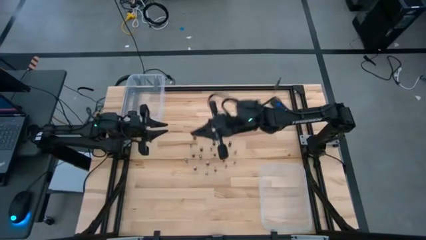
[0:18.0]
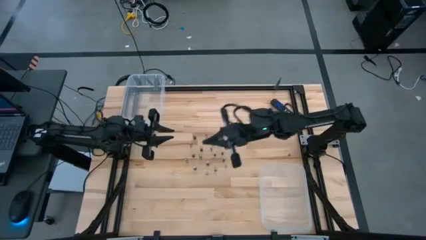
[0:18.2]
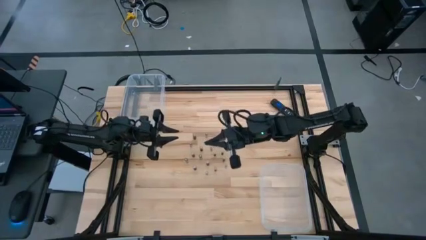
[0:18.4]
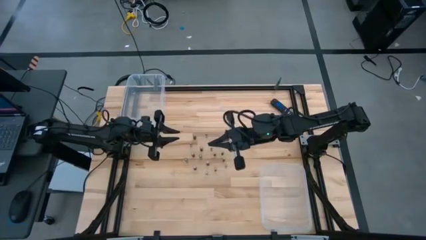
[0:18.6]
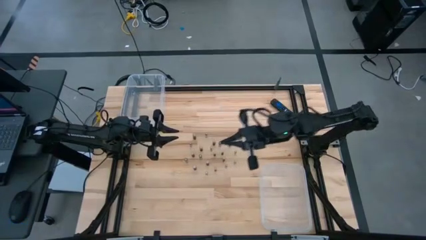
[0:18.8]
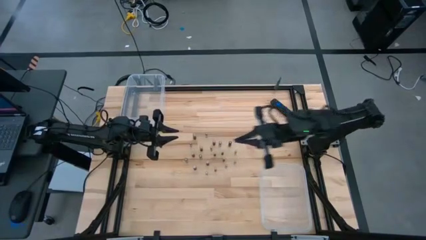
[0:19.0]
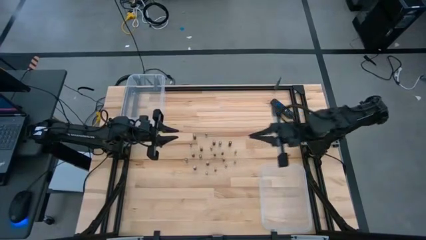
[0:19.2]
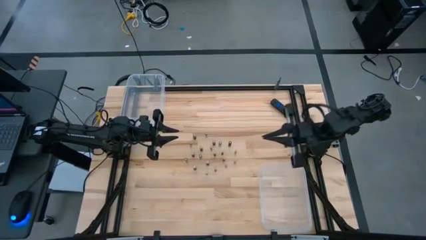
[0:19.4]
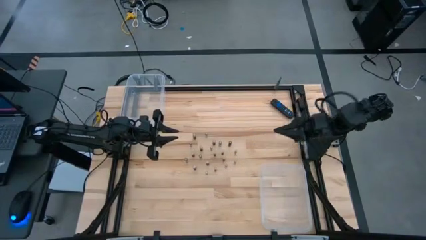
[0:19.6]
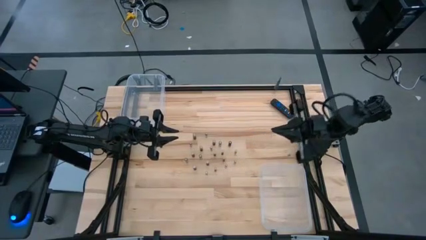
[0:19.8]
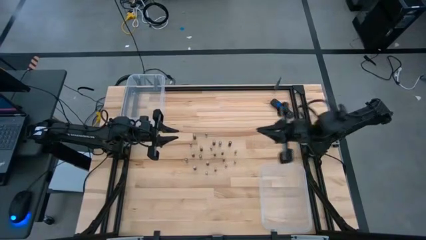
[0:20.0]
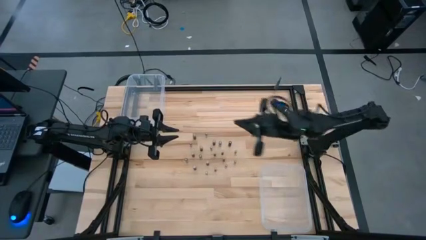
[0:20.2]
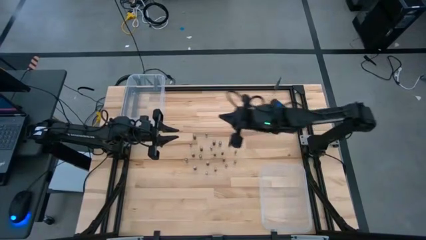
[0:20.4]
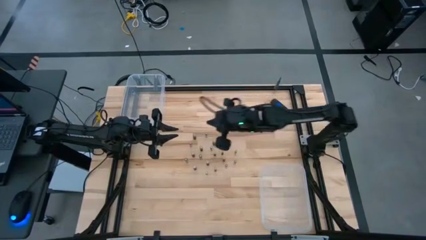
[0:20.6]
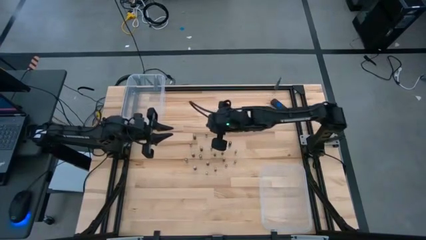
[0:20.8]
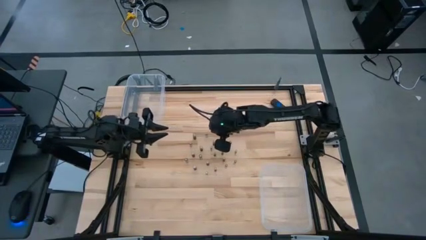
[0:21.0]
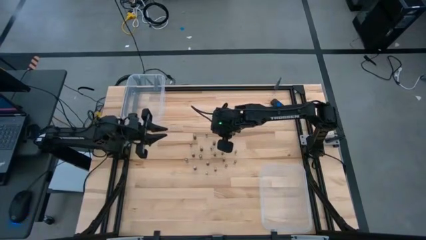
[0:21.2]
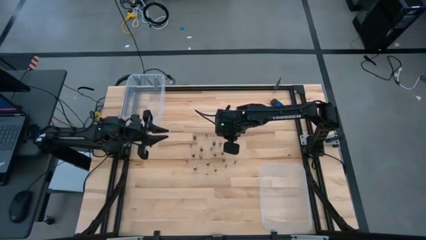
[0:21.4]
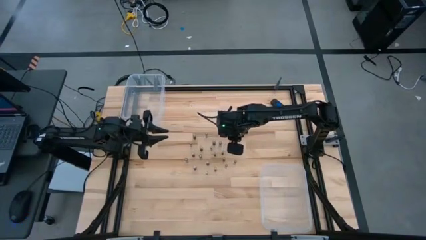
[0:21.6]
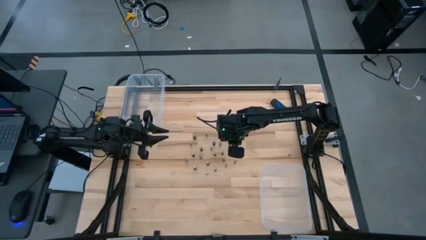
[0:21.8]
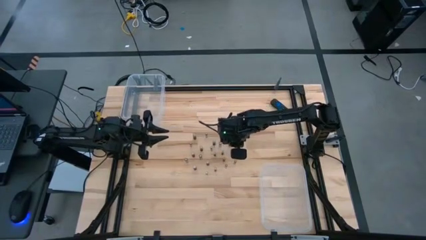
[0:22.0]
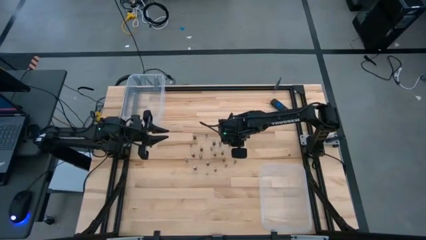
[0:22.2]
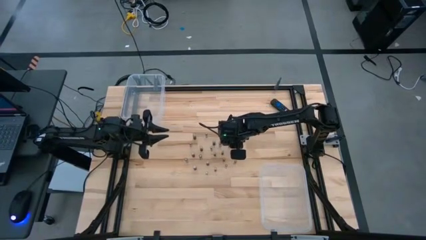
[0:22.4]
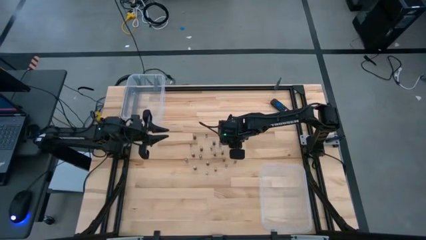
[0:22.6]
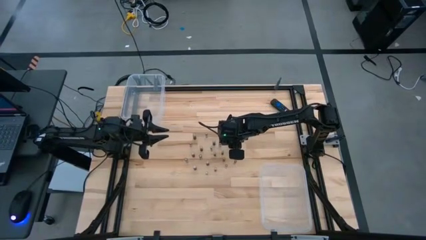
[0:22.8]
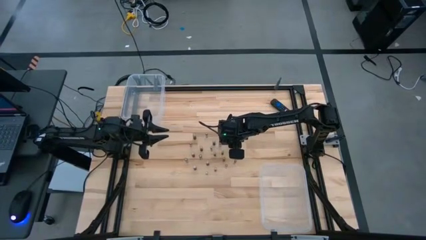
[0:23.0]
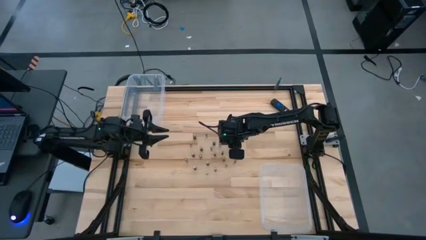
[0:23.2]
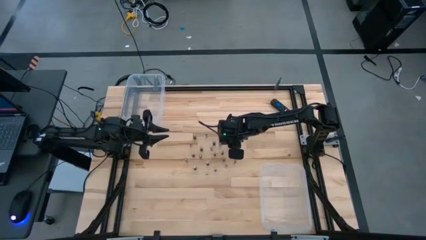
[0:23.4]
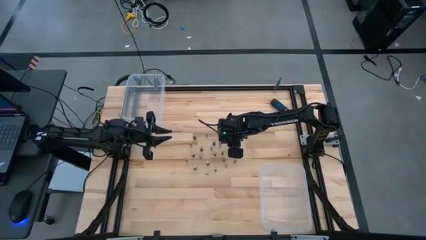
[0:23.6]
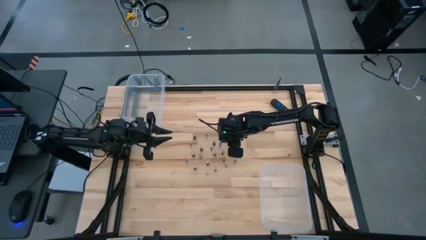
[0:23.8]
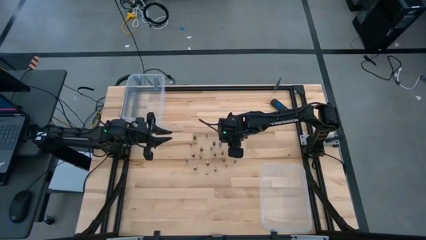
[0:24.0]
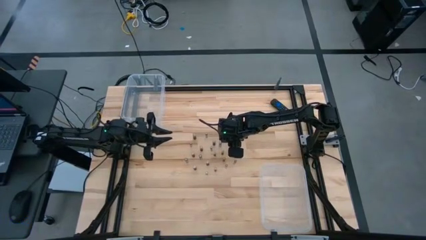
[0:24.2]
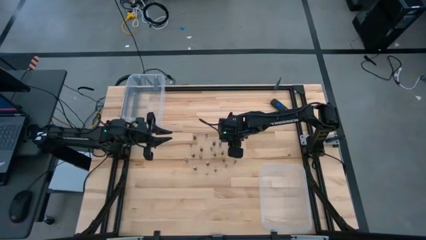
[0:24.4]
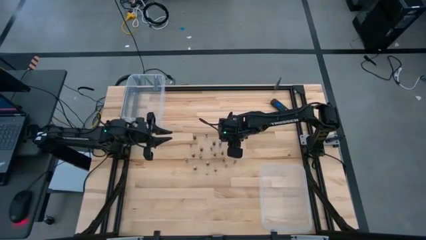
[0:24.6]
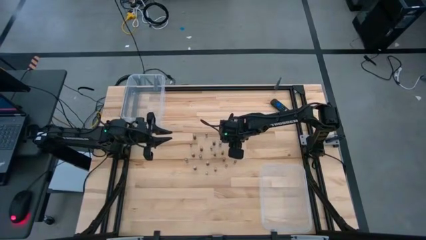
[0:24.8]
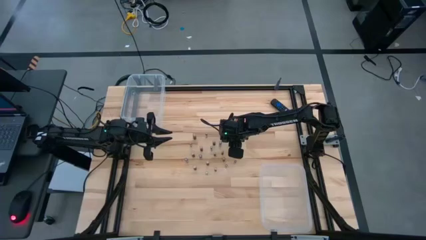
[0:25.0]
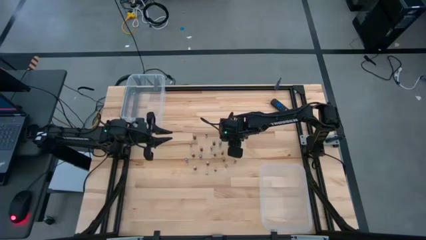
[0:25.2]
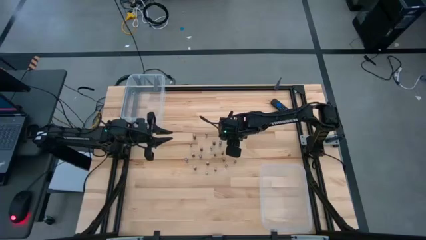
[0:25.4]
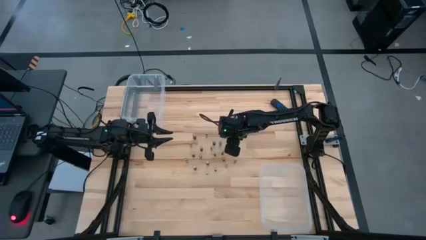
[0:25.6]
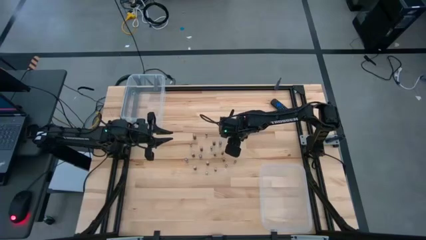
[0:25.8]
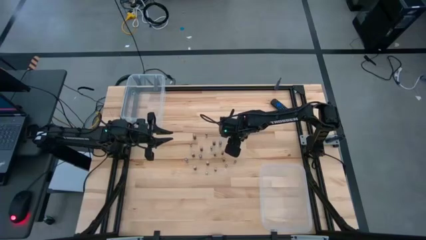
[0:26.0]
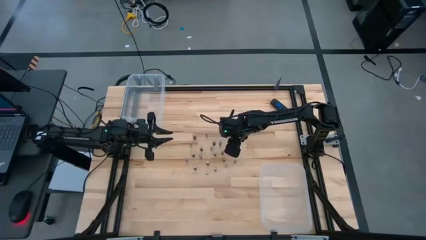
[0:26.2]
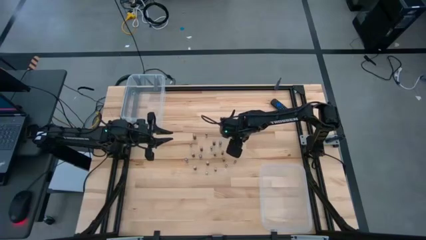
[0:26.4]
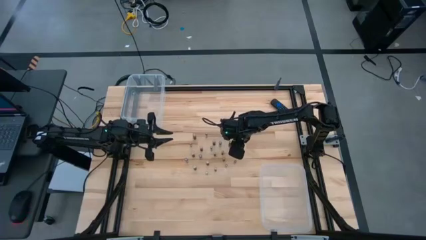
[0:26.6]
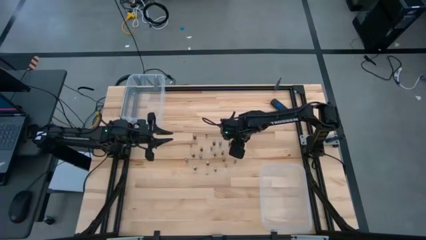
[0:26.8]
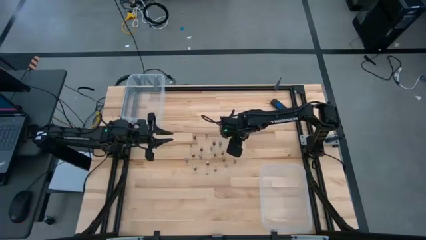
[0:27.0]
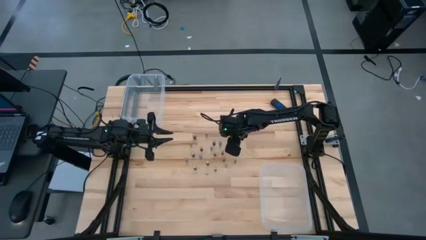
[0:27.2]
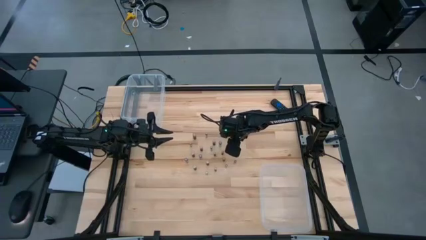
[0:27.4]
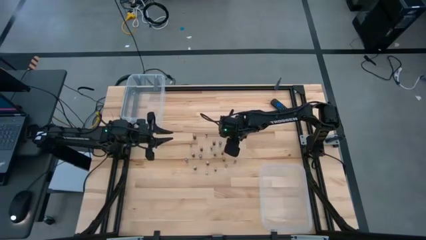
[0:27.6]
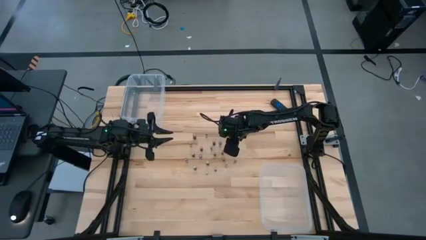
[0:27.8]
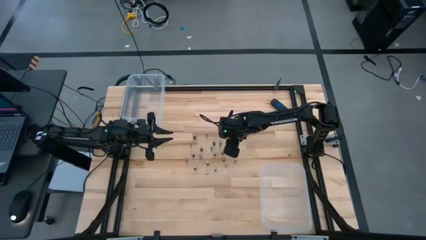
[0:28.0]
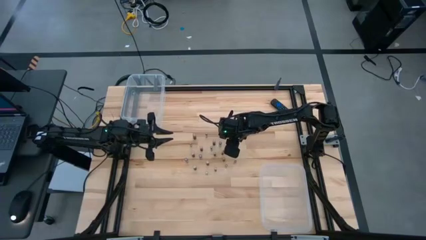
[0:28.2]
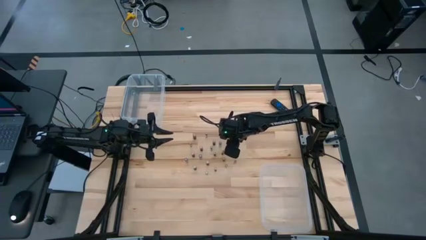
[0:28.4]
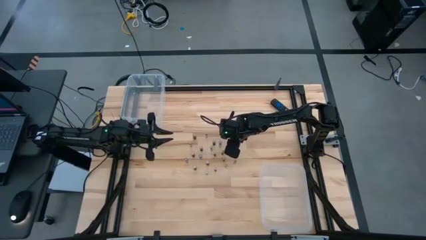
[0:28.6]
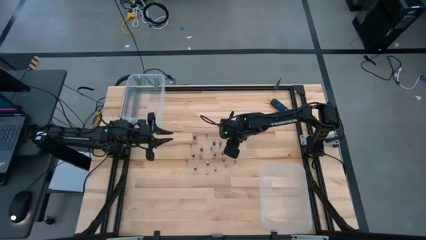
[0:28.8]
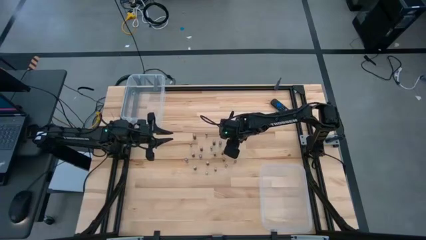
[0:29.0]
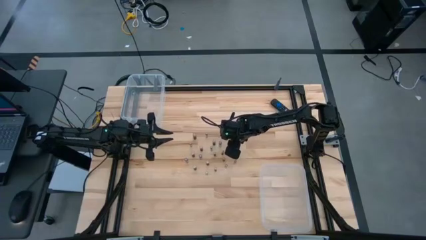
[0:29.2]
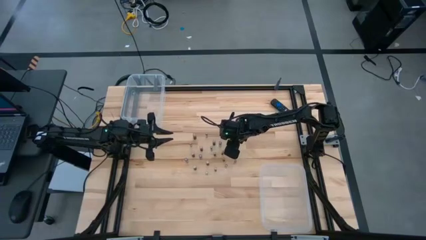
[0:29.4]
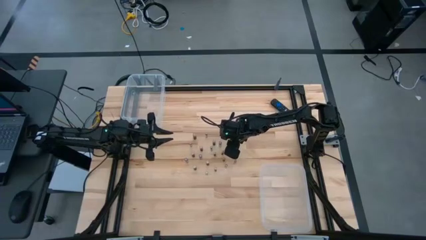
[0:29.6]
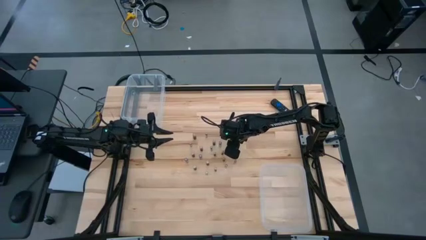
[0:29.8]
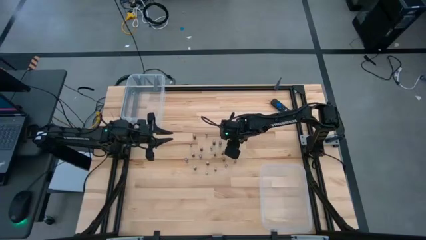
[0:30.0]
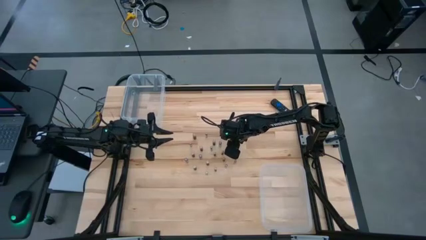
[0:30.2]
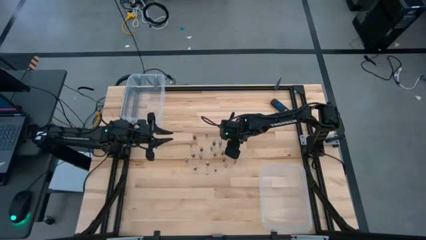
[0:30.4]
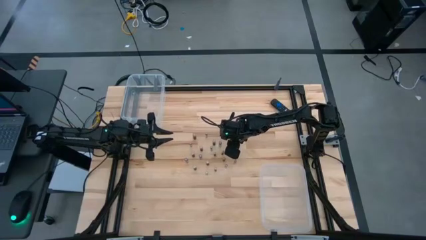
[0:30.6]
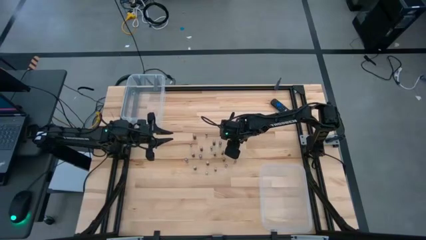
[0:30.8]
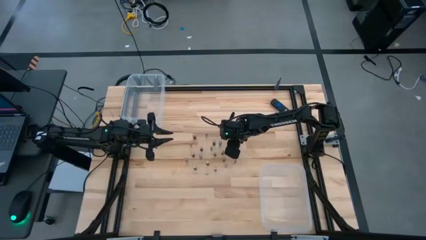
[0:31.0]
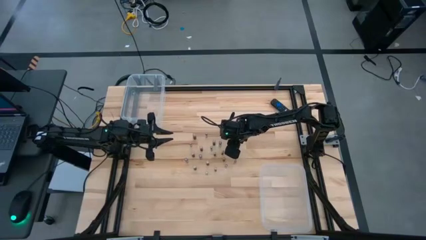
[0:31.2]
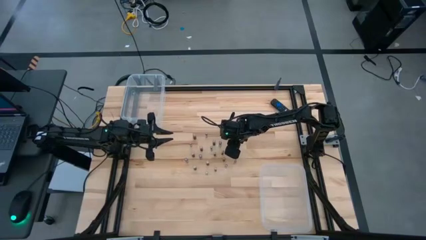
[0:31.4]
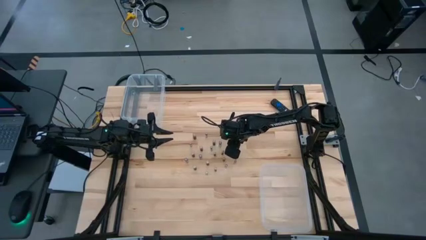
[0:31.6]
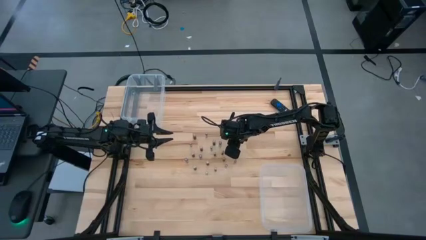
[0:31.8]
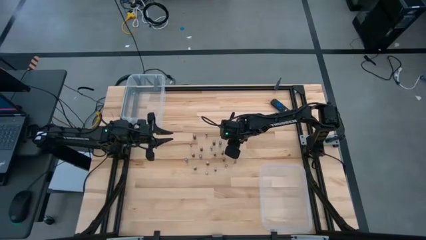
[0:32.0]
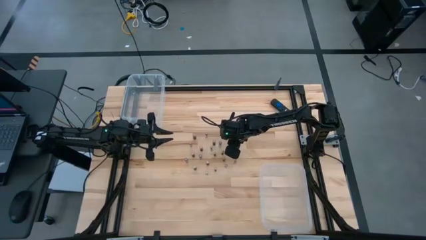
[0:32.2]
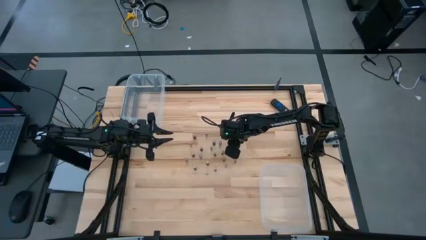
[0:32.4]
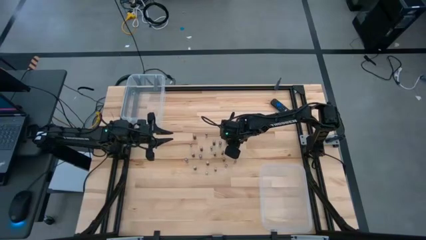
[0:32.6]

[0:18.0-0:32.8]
Task: Sort batteries
Put the black and copper battery into the top transparent bin
